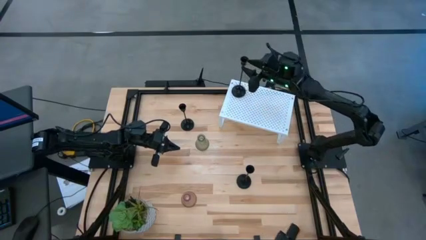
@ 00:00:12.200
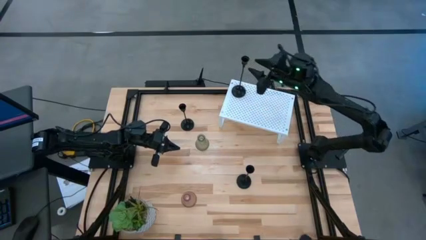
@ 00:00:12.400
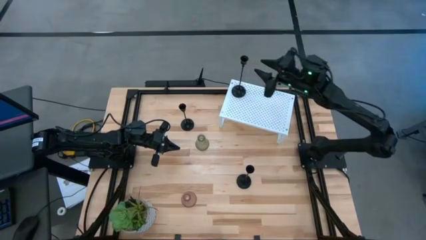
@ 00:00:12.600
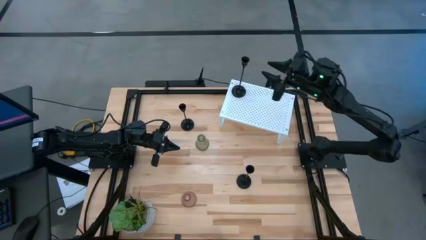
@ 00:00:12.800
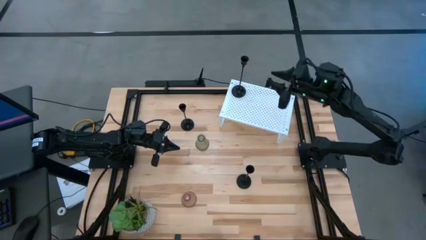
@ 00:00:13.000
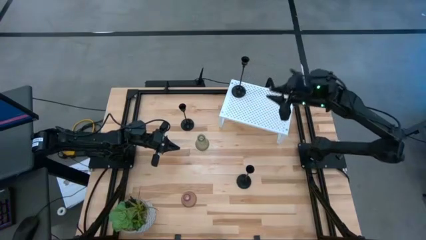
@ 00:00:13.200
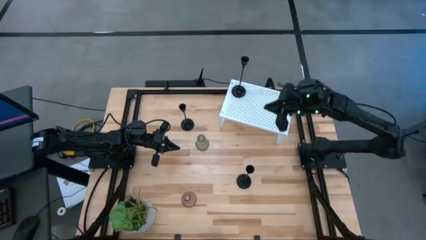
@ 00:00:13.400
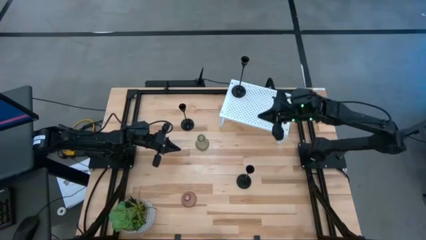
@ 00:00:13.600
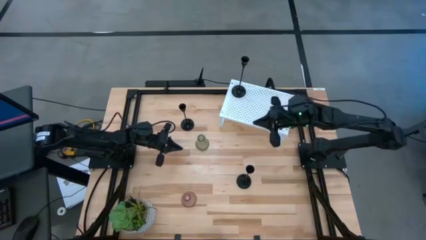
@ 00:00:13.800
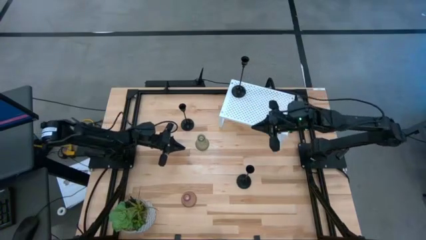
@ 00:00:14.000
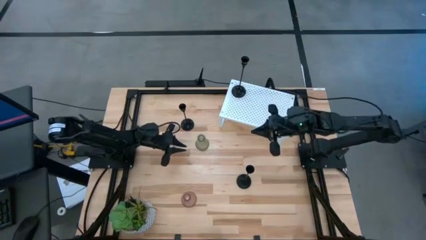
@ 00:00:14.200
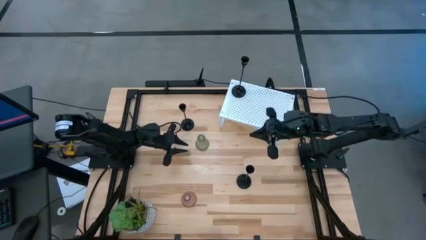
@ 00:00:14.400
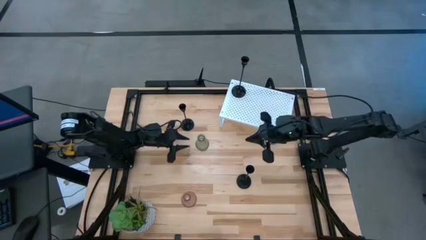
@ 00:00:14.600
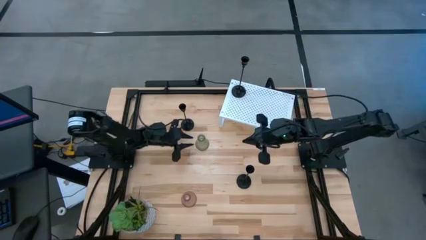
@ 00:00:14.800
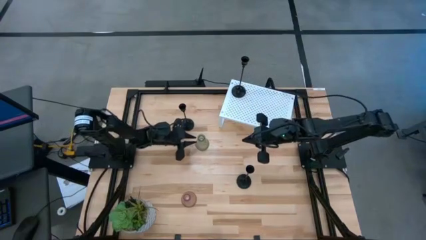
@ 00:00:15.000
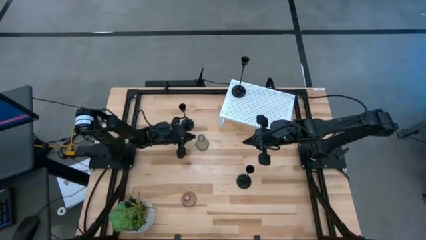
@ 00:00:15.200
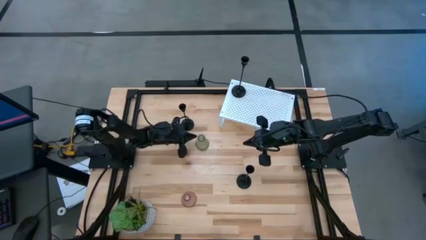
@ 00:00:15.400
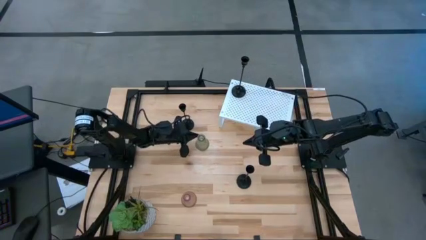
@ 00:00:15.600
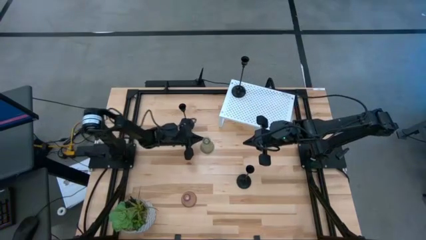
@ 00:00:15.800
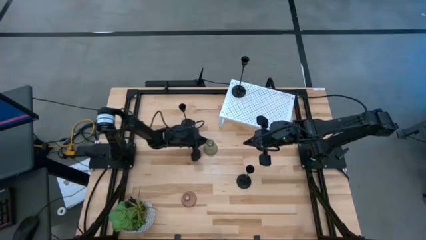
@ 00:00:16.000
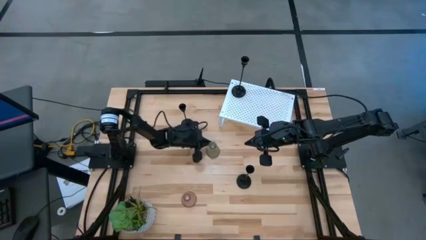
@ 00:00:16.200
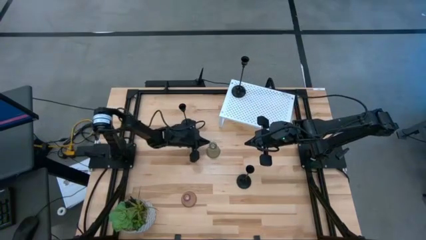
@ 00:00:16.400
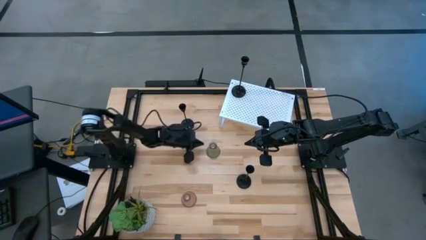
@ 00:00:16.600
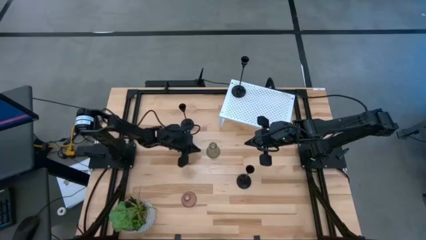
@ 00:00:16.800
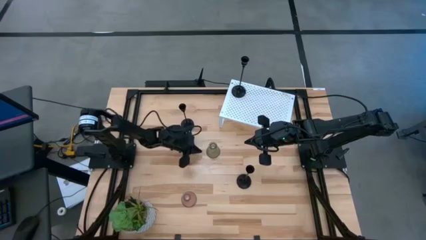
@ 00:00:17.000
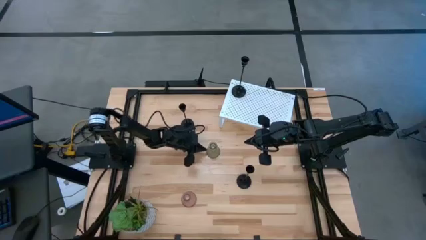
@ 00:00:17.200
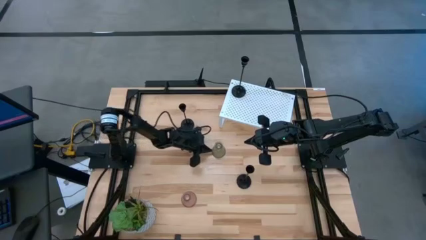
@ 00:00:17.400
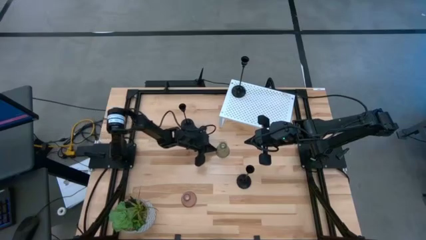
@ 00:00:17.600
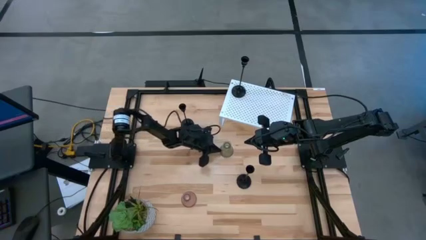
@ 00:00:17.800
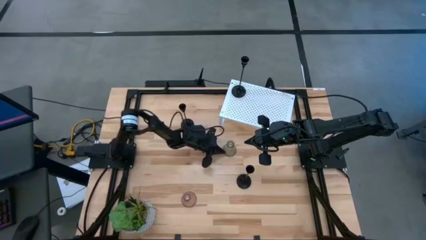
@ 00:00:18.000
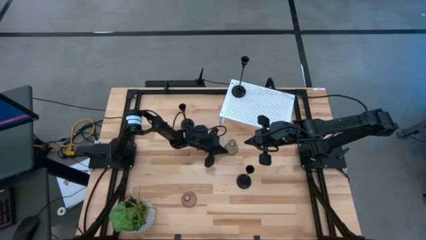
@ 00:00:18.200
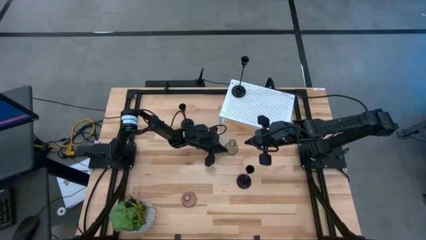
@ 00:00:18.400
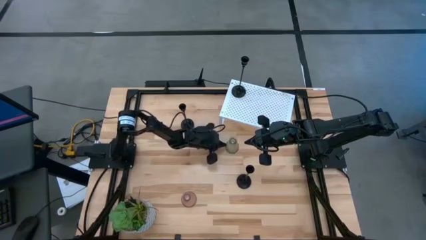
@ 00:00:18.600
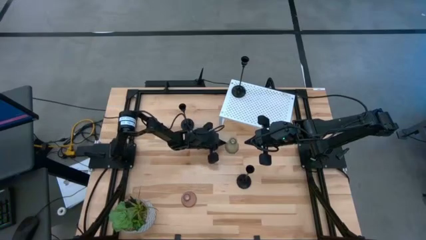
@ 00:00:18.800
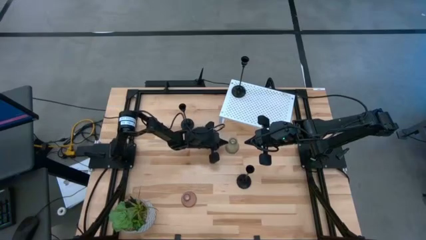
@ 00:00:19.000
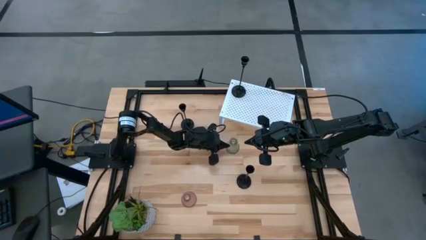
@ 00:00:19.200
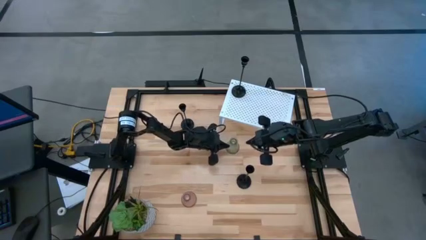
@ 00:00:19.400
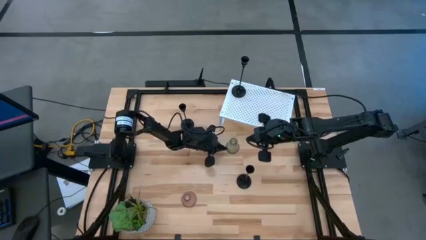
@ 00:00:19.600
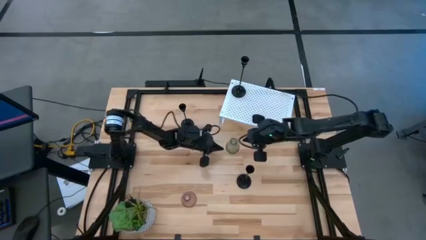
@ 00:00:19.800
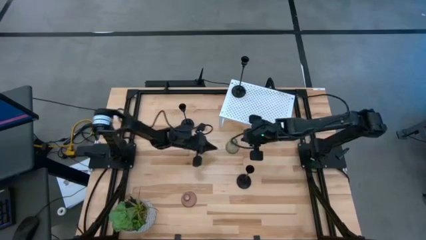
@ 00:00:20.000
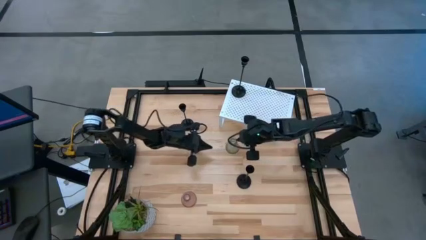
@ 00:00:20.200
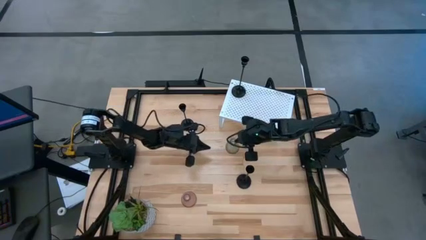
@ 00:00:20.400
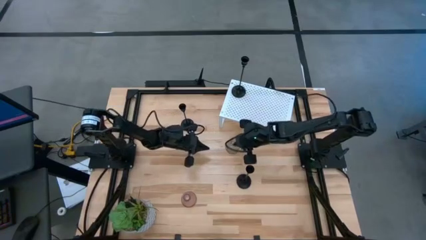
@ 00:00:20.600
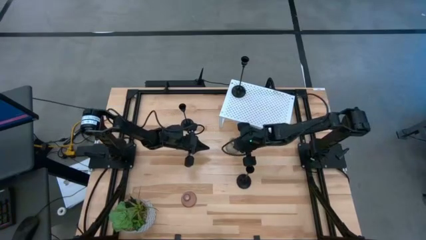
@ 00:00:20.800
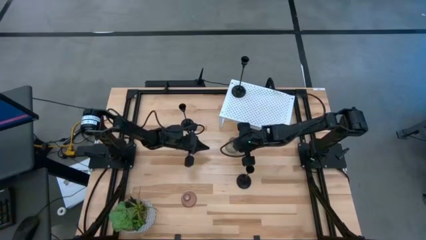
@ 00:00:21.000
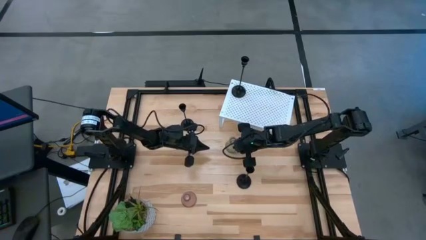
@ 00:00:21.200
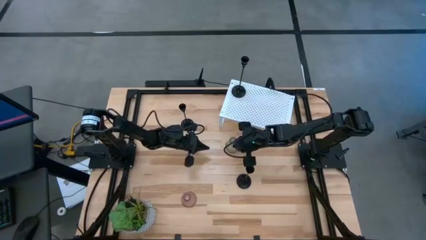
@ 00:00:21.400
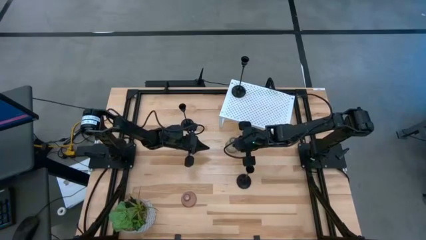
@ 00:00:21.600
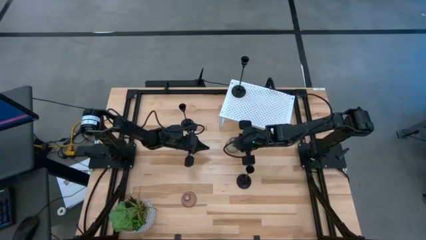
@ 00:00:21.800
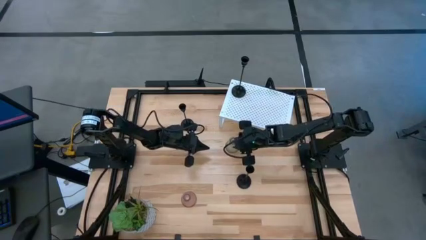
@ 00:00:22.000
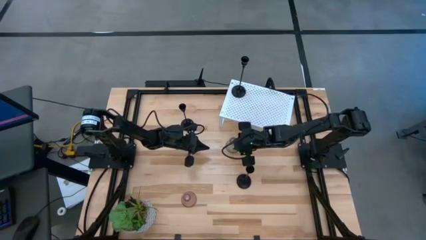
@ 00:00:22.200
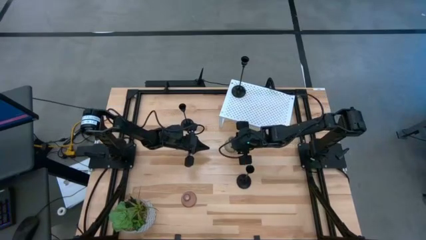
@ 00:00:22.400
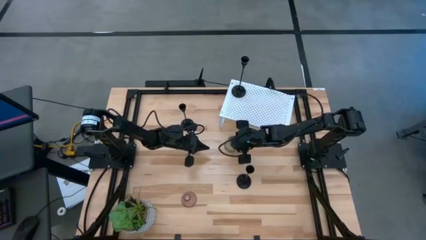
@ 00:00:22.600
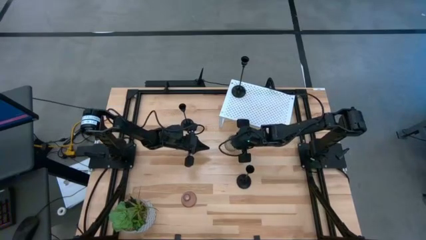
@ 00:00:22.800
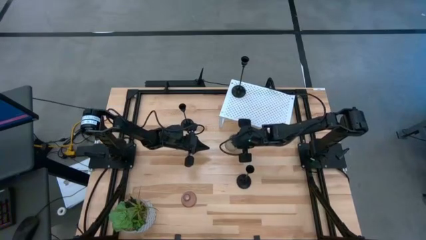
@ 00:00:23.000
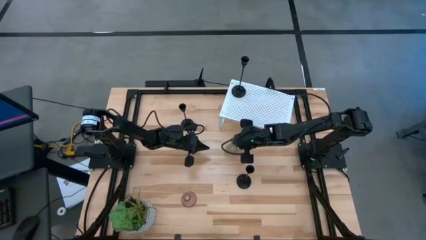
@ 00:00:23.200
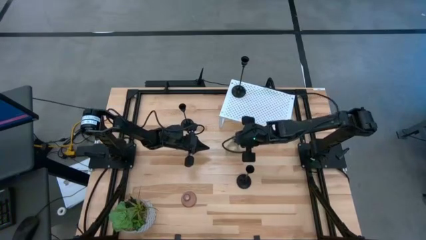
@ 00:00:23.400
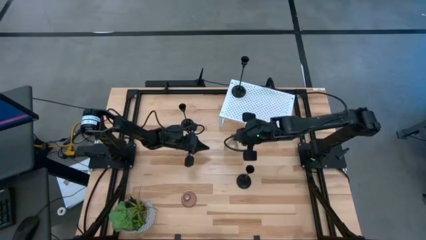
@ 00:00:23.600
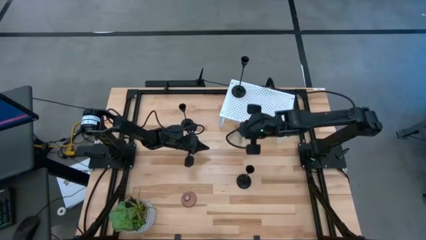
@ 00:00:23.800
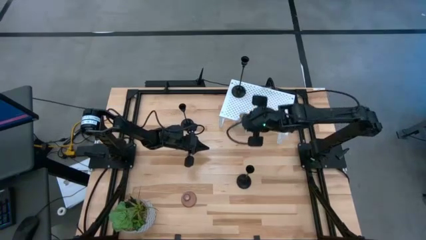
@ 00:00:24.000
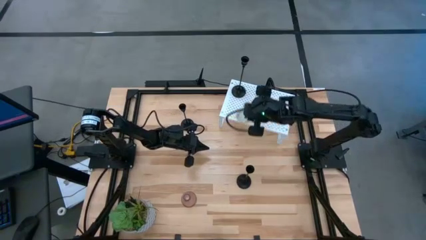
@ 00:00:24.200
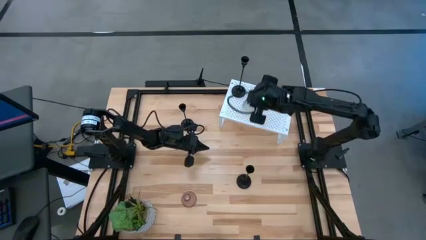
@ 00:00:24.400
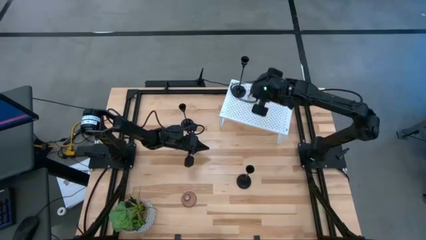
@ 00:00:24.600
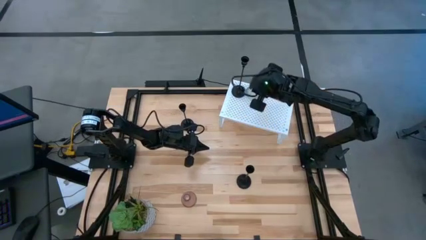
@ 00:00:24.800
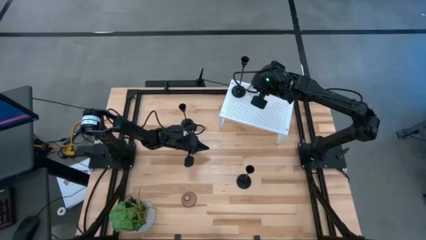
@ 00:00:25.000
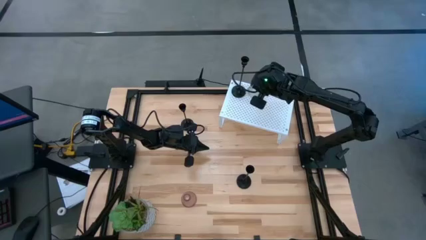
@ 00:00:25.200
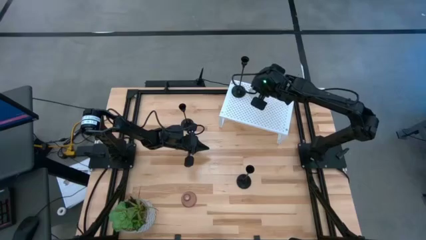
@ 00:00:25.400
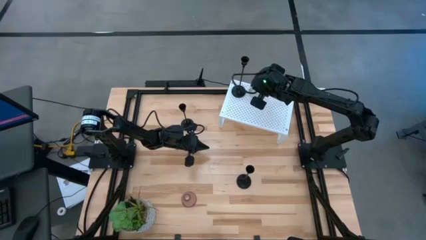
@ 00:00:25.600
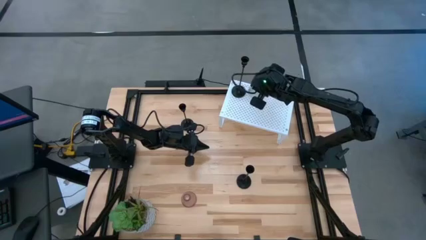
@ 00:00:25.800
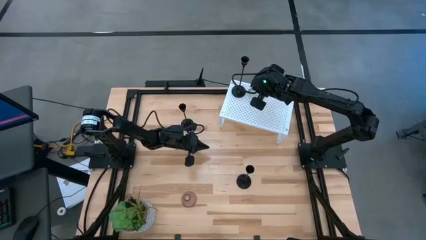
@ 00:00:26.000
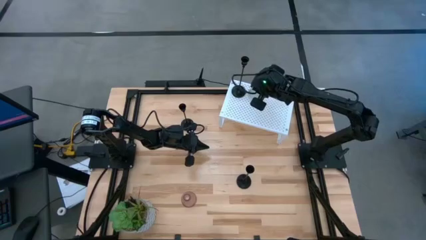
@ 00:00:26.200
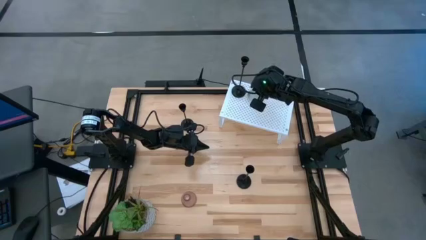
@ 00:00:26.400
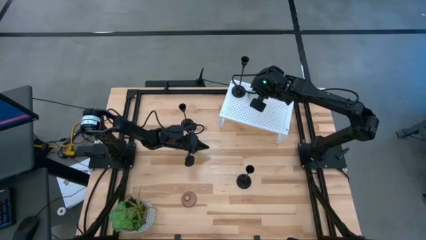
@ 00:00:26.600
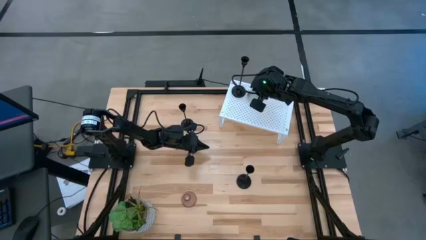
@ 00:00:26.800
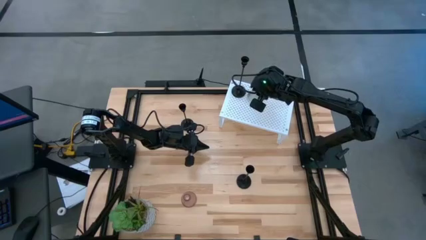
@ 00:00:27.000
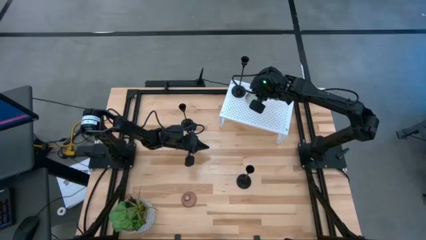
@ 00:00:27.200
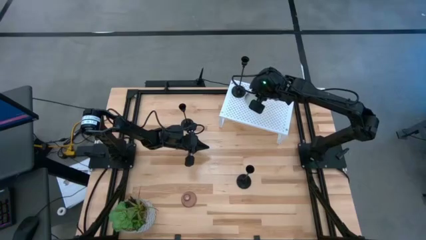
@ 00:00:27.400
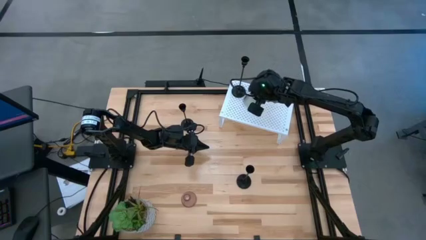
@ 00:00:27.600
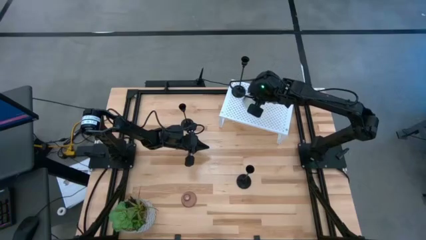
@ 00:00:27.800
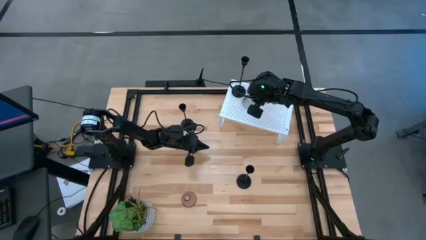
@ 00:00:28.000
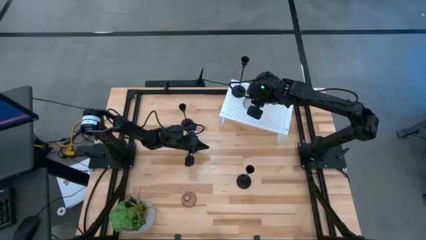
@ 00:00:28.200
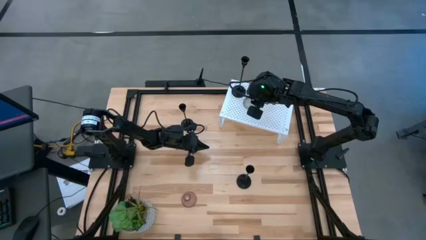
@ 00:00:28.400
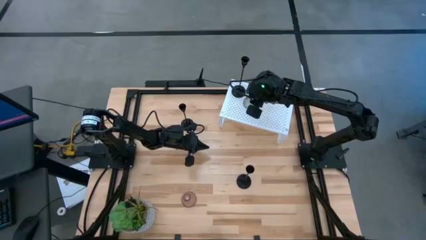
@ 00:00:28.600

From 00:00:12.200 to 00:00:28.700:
Task: Pick & Place candle stick holders
Put the green candle holder on the shelf
